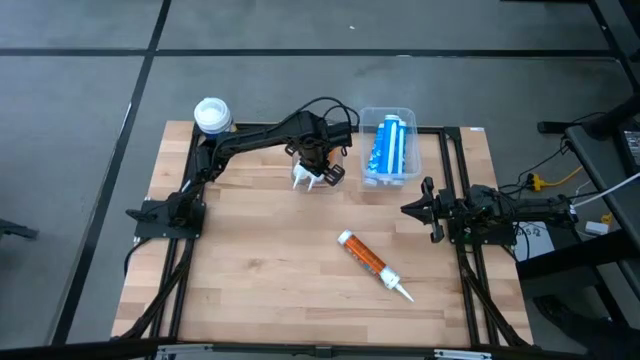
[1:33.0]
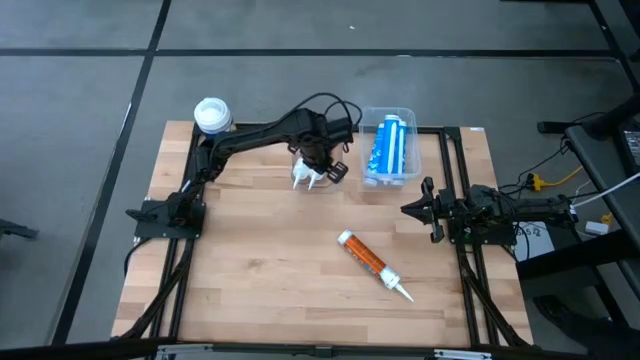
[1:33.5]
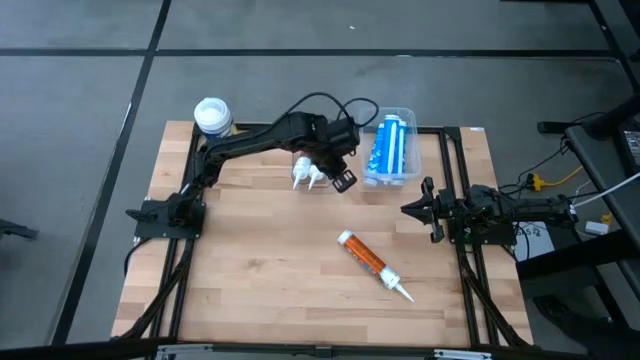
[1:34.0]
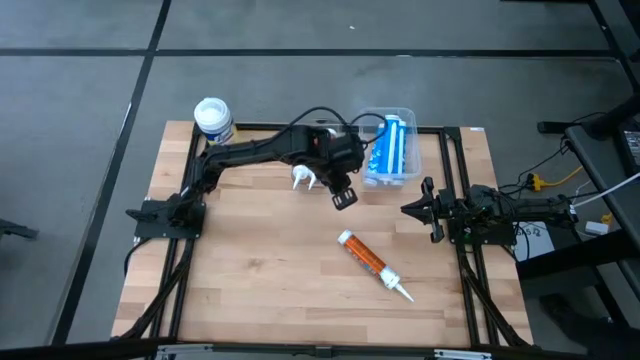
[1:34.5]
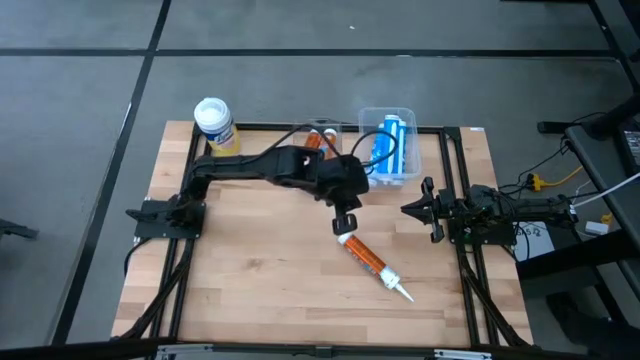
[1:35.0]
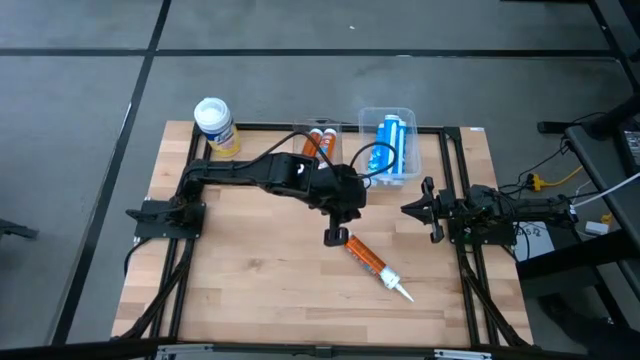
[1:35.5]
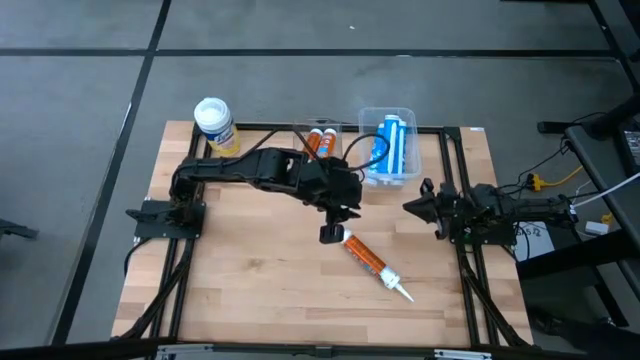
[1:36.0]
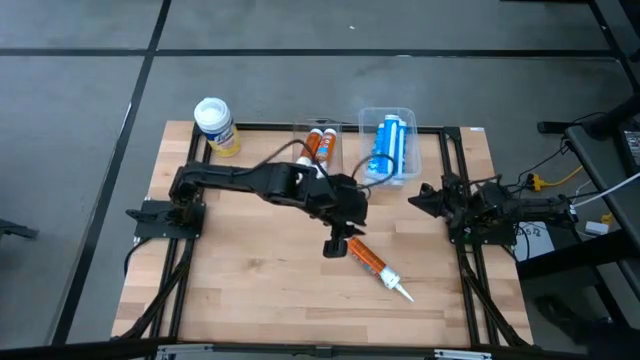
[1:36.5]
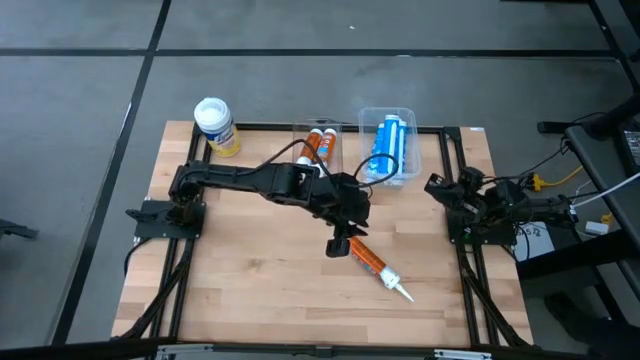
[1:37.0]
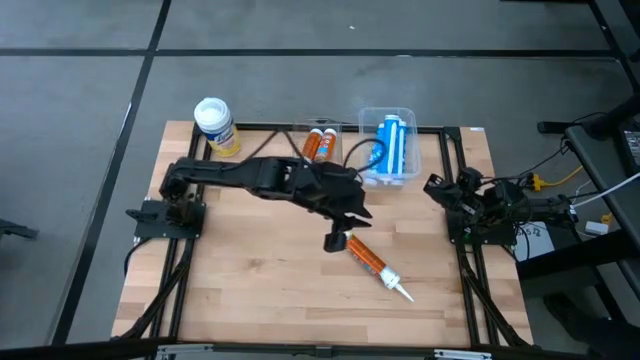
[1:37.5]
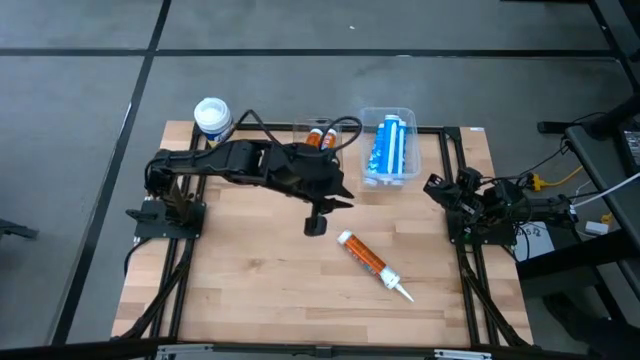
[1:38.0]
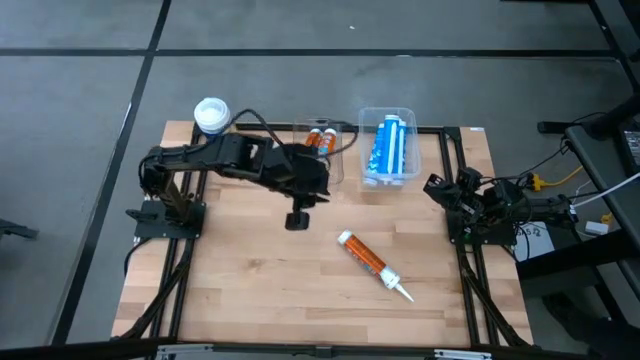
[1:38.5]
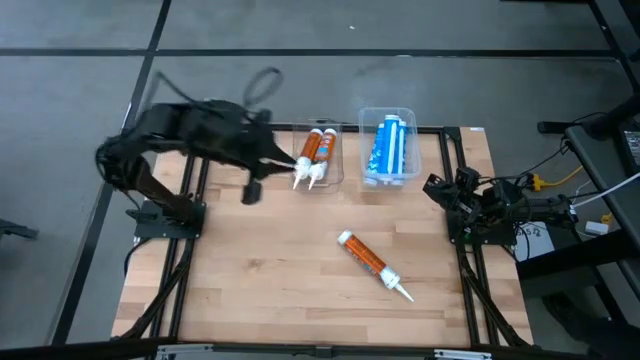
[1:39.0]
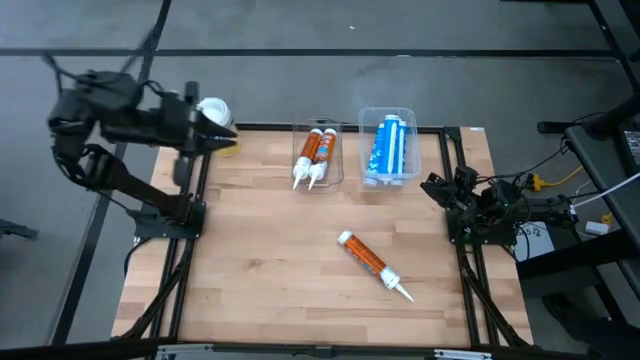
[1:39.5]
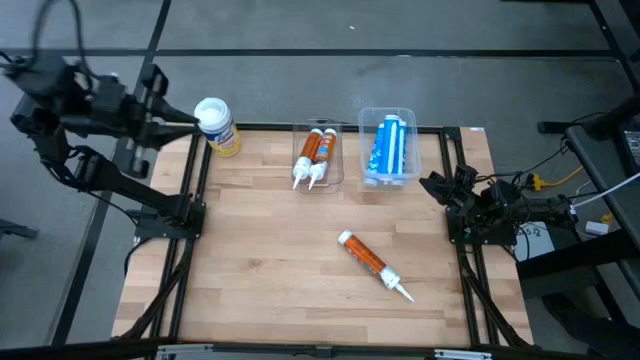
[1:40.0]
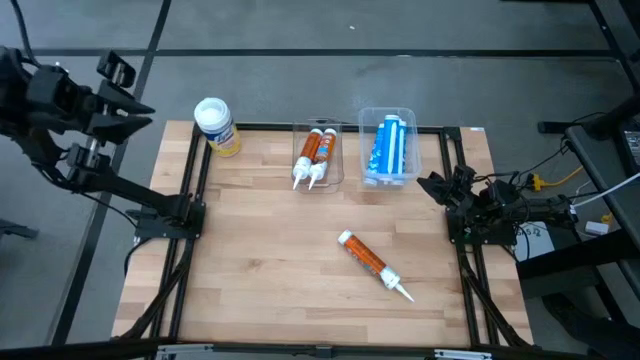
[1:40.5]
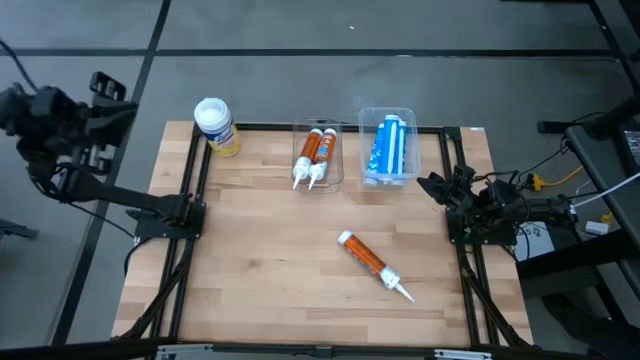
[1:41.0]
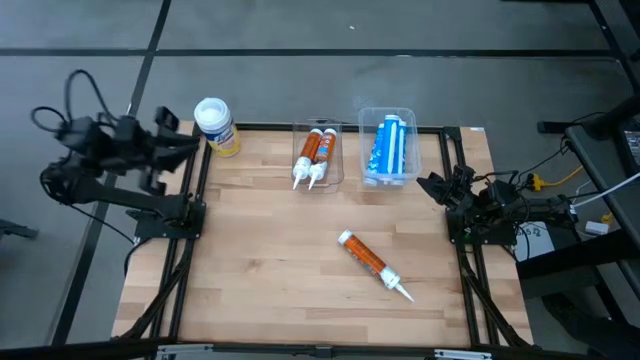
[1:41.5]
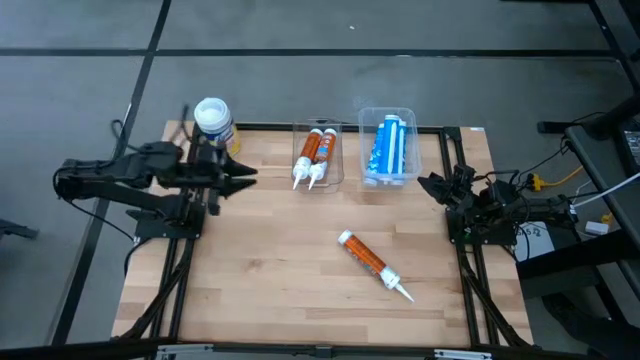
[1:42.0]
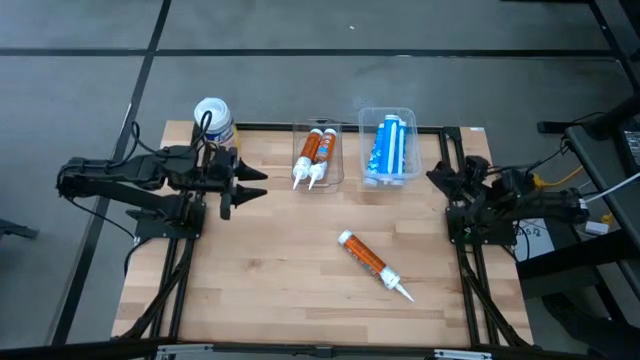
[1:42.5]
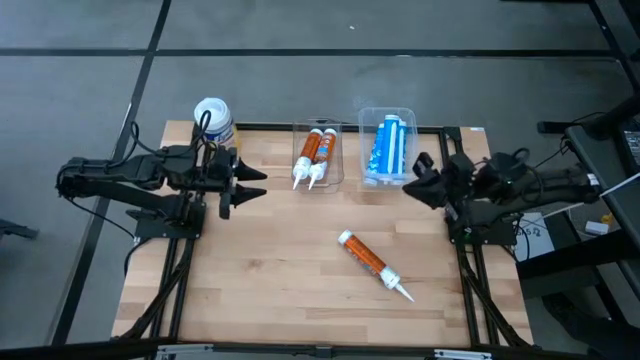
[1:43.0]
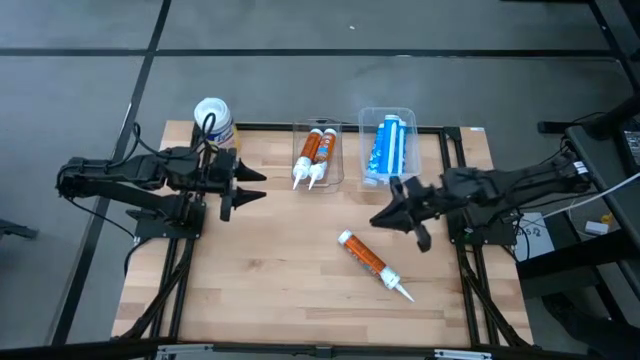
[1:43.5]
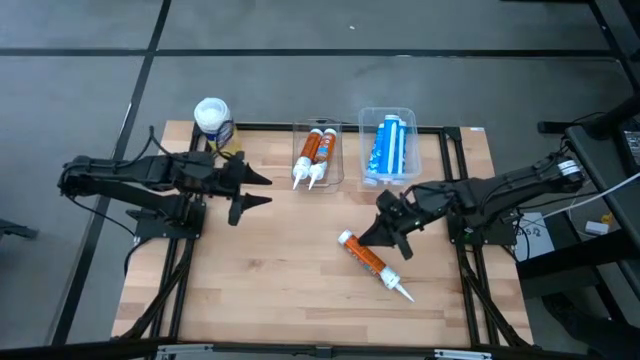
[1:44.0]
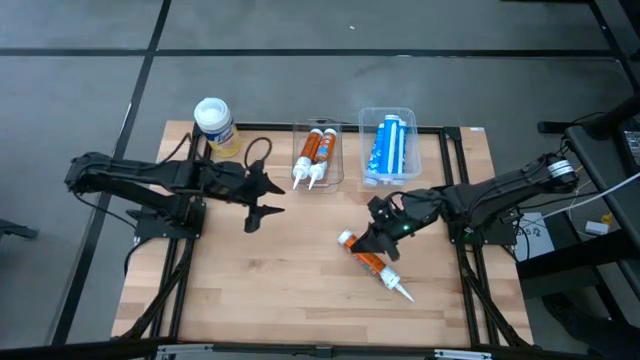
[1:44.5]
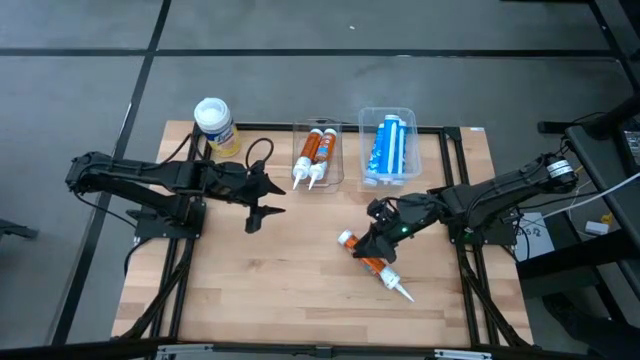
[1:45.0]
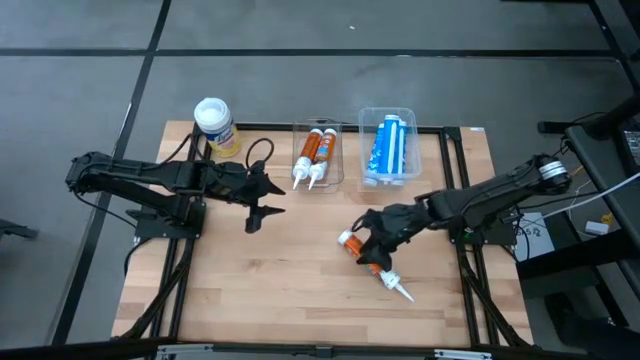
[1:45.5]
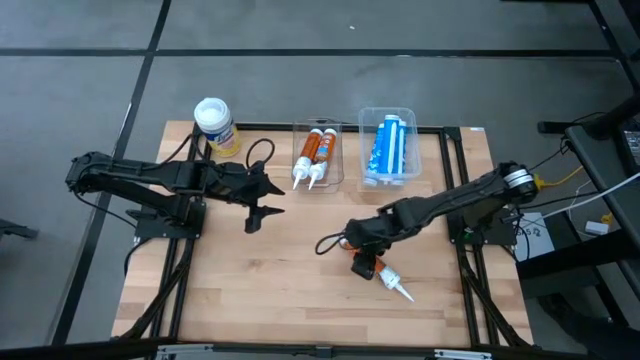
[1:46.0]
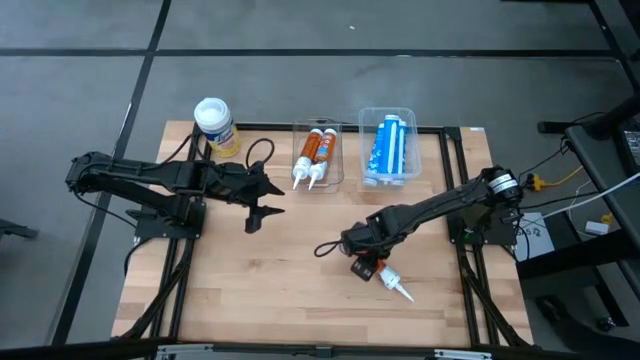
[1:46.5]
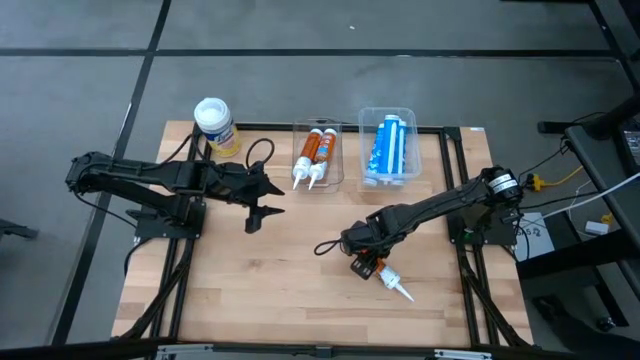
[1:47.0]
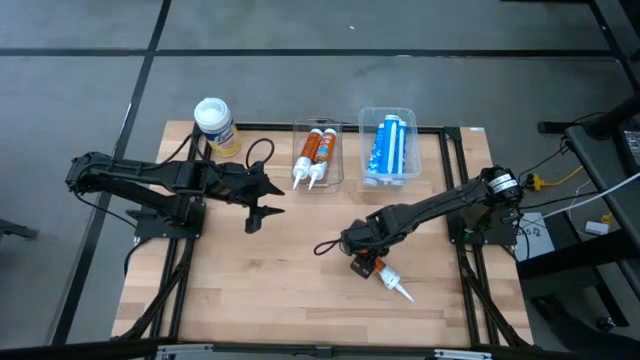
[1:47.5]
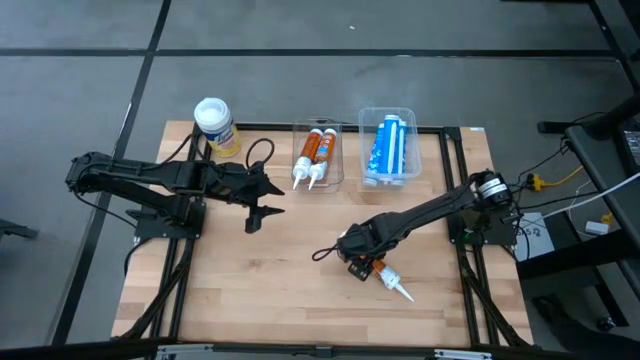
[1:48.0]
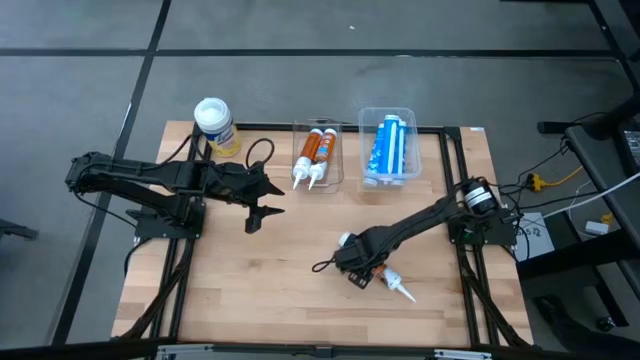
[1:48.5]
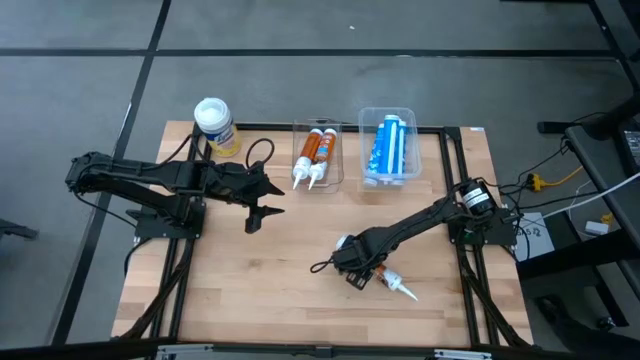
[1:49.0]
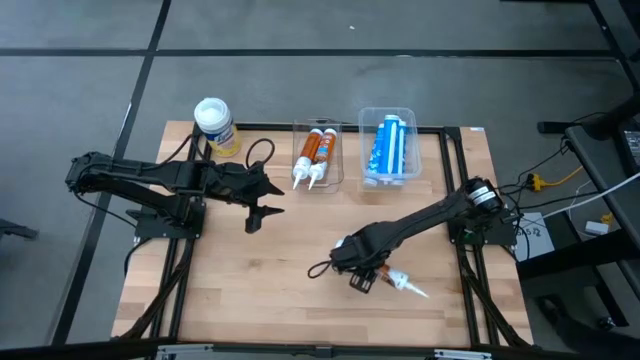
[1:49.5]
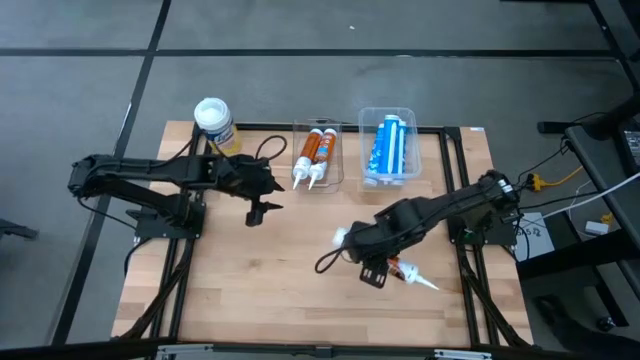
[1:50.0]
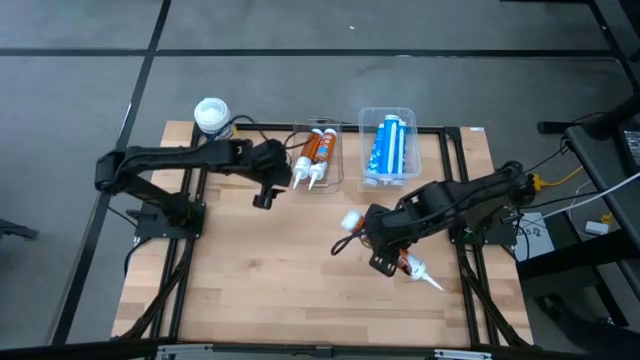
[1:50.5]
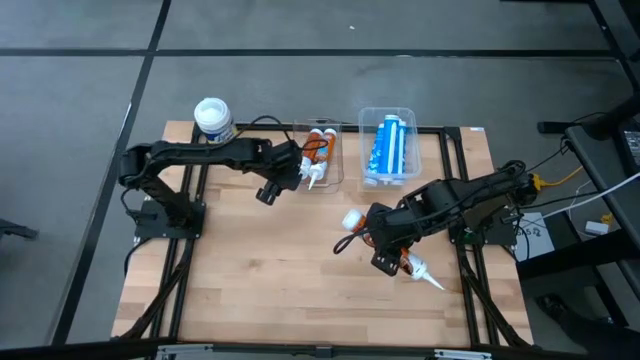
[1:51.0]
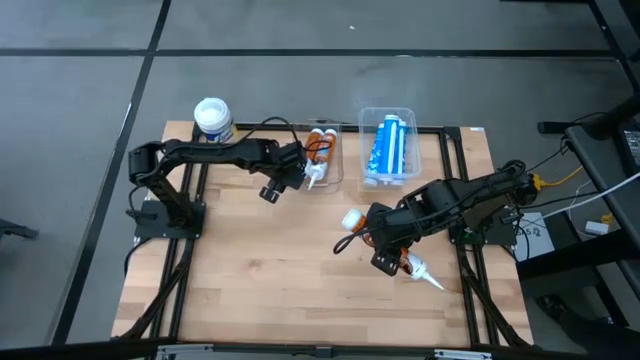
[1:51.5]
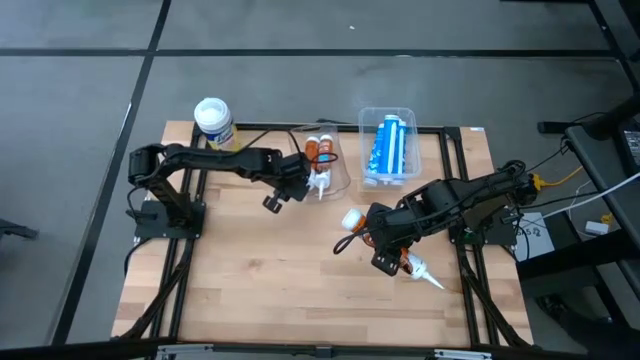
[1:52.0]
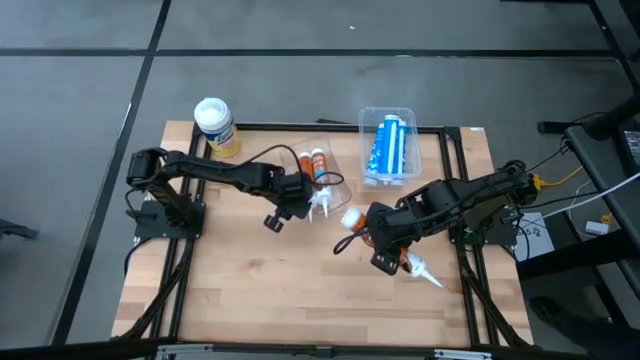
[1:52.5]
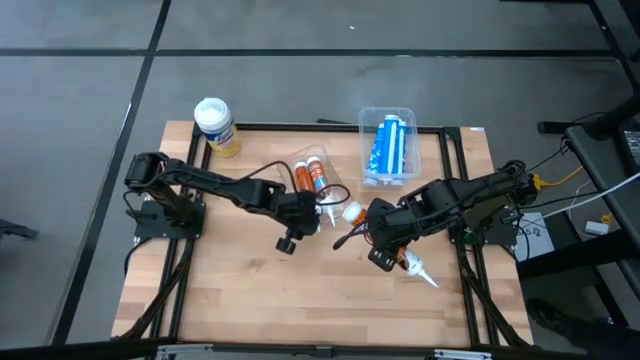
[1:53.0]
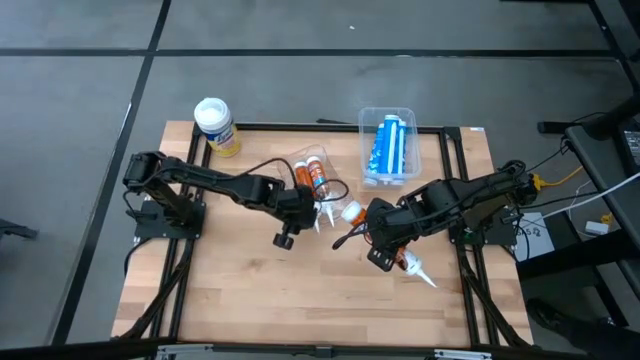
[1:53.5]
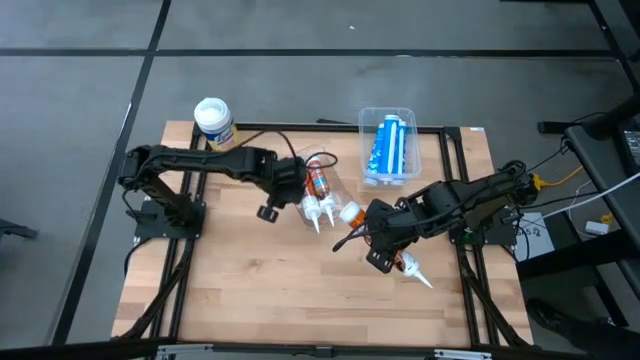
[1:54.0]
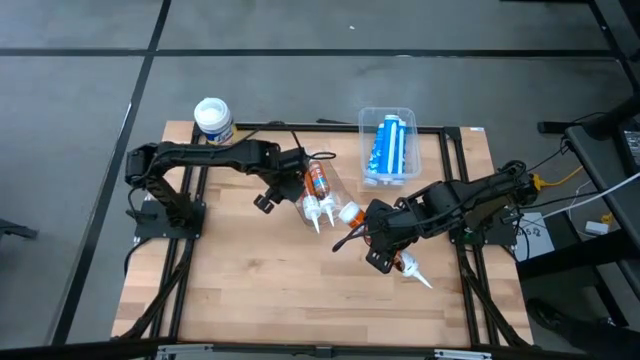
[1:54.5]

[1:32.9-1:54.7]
Task: Pick & place silicon tubes, Sealant and Lysol wipes
Put the orange sealant into the left transparent bin
